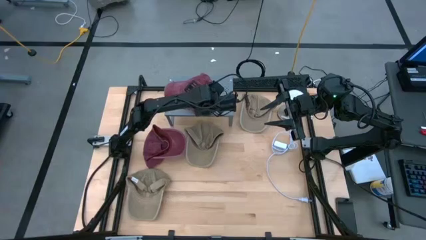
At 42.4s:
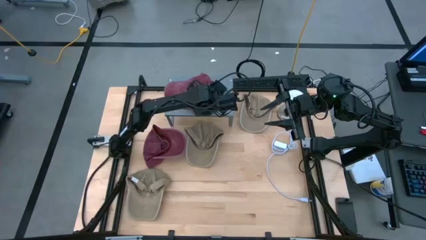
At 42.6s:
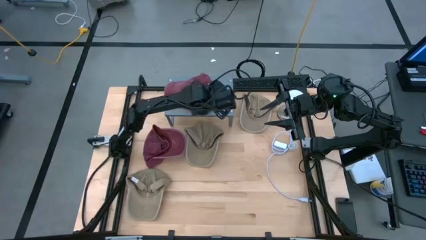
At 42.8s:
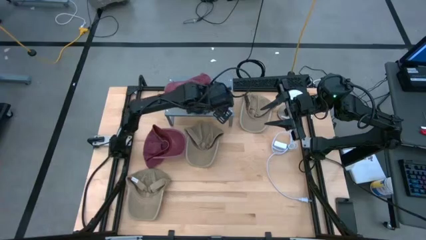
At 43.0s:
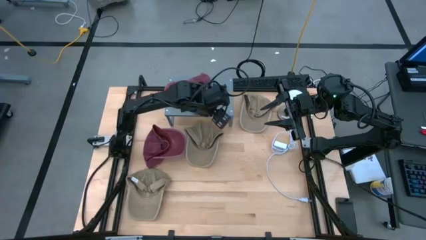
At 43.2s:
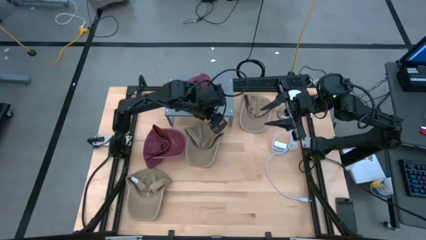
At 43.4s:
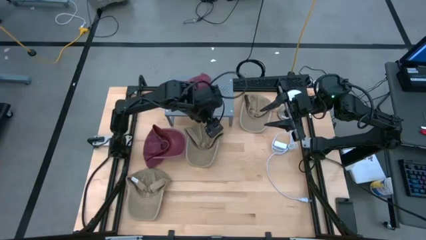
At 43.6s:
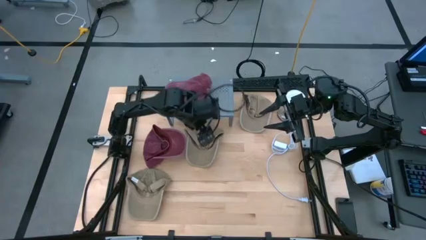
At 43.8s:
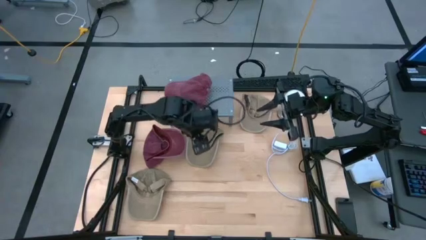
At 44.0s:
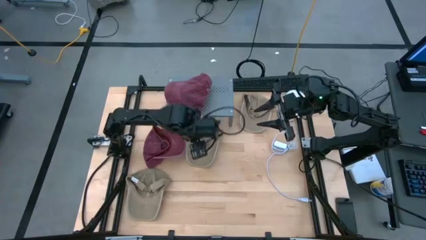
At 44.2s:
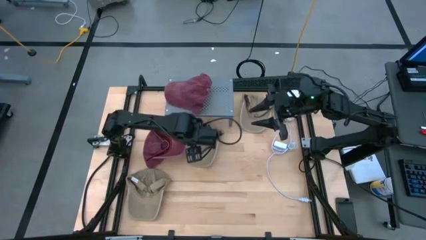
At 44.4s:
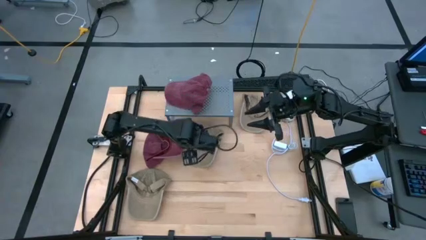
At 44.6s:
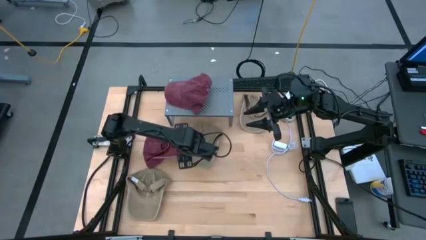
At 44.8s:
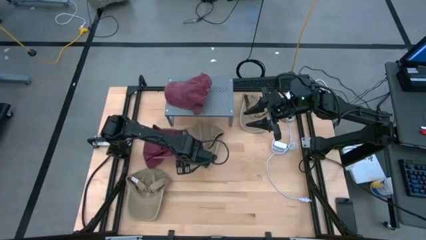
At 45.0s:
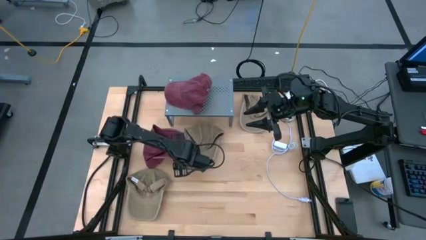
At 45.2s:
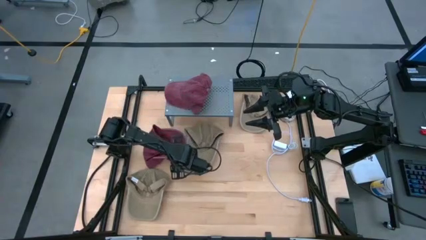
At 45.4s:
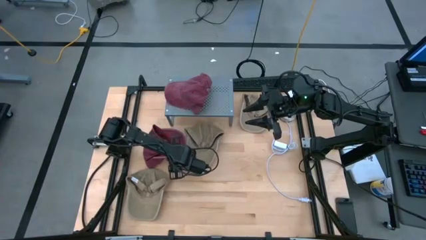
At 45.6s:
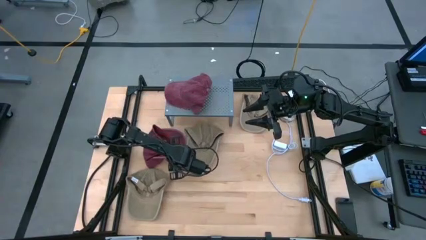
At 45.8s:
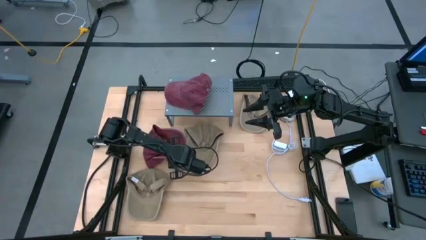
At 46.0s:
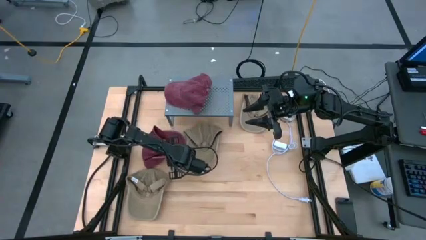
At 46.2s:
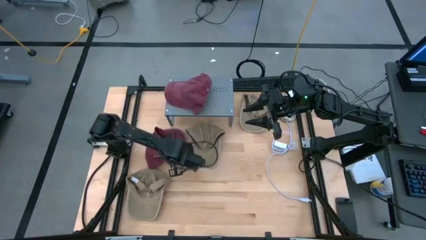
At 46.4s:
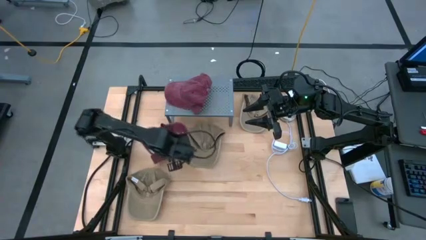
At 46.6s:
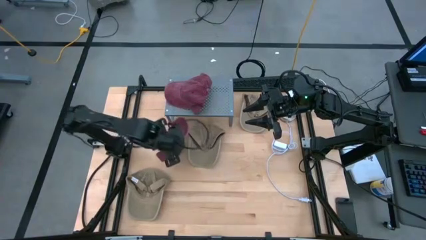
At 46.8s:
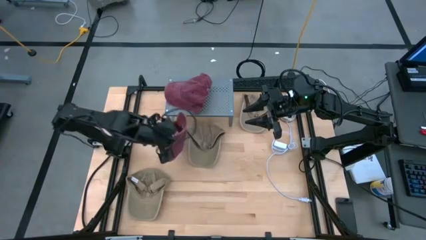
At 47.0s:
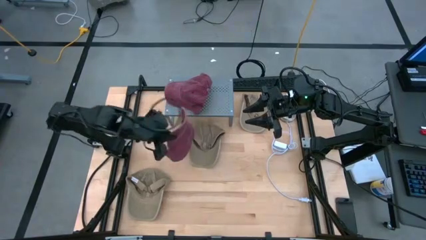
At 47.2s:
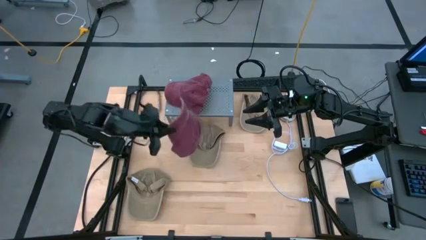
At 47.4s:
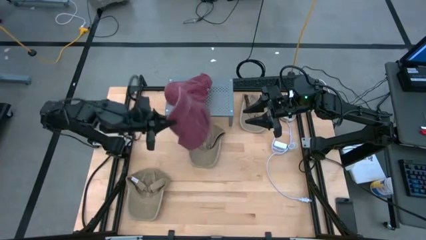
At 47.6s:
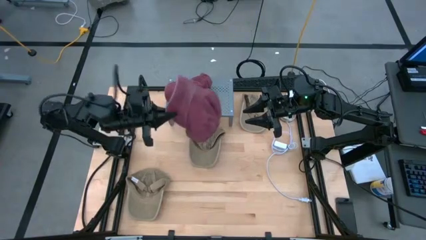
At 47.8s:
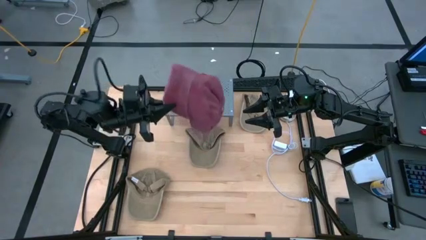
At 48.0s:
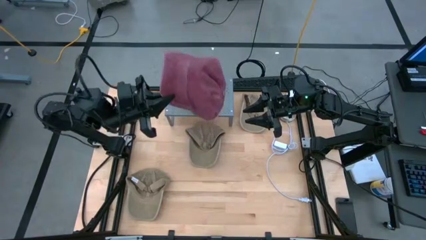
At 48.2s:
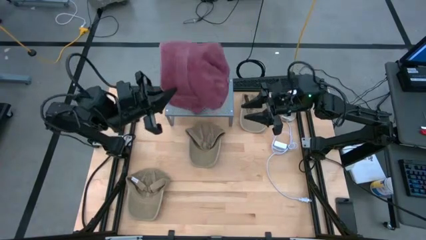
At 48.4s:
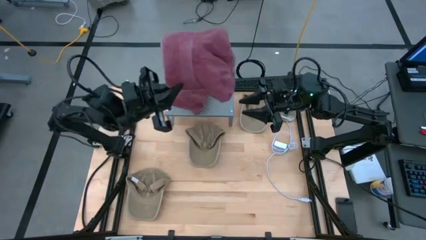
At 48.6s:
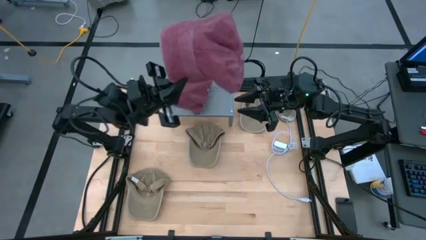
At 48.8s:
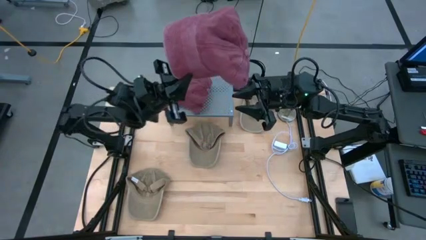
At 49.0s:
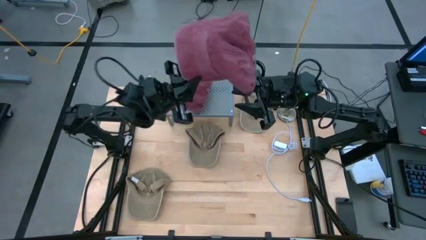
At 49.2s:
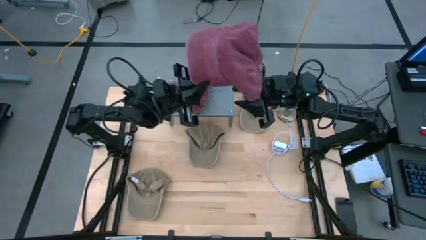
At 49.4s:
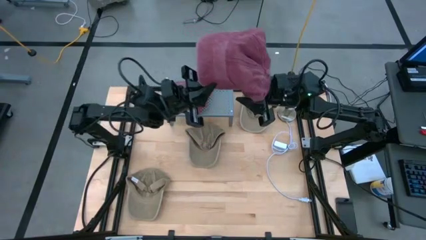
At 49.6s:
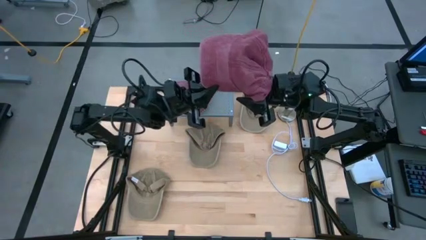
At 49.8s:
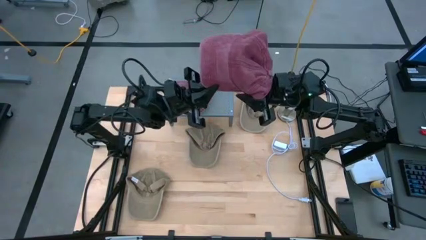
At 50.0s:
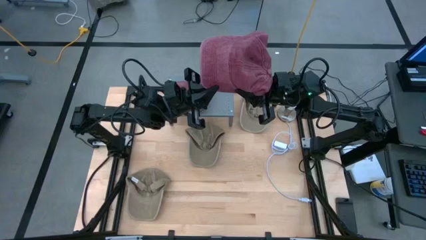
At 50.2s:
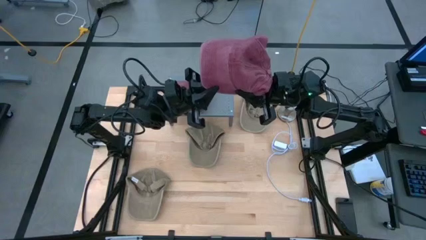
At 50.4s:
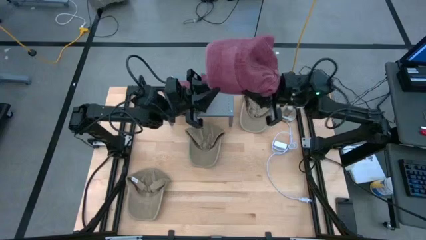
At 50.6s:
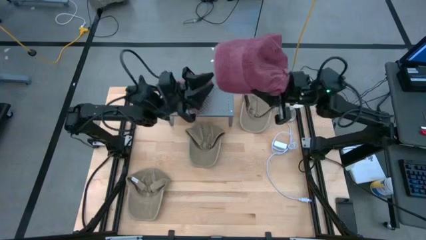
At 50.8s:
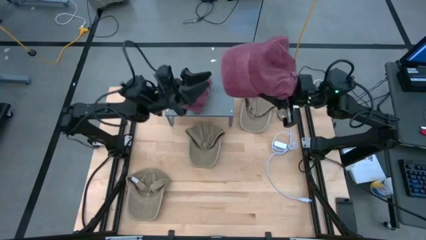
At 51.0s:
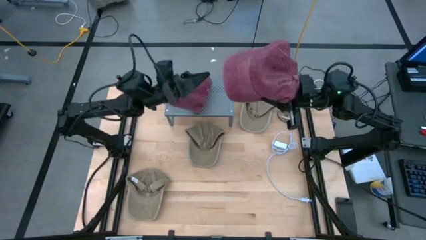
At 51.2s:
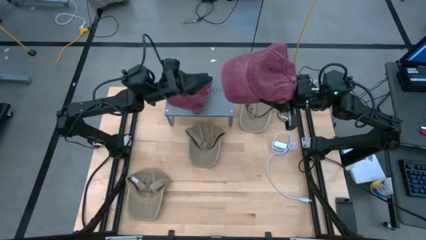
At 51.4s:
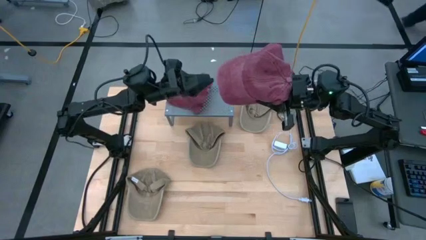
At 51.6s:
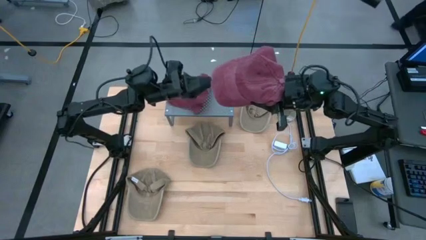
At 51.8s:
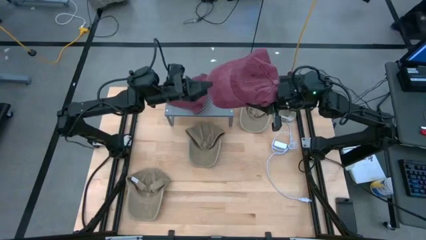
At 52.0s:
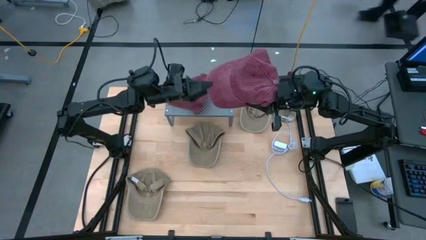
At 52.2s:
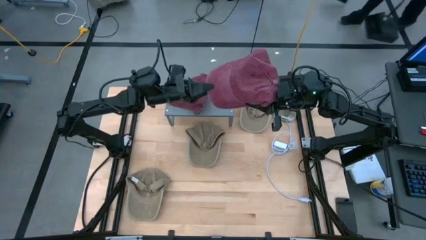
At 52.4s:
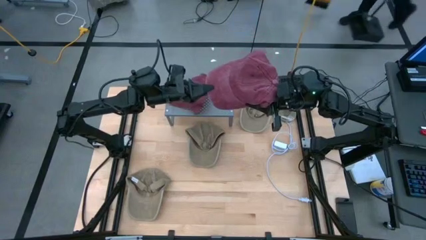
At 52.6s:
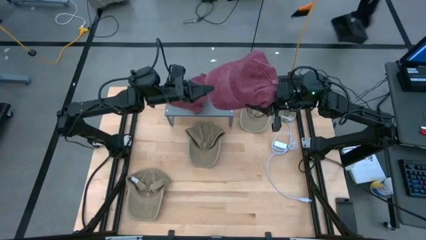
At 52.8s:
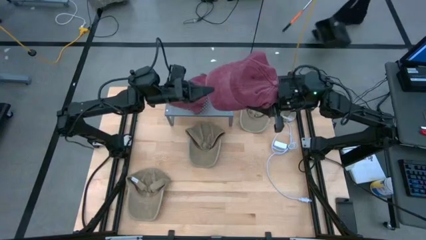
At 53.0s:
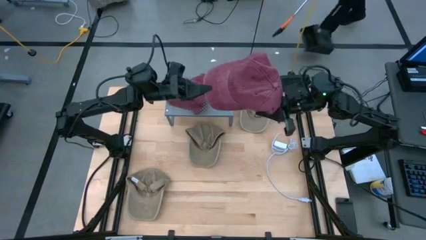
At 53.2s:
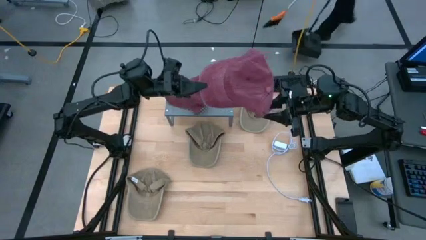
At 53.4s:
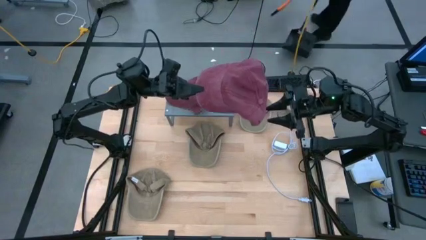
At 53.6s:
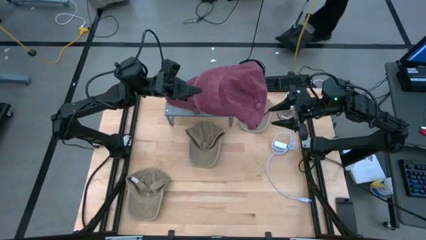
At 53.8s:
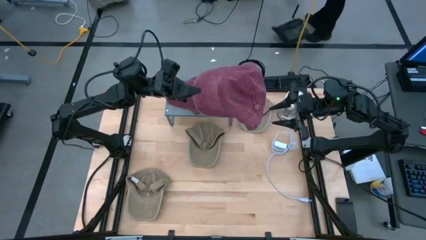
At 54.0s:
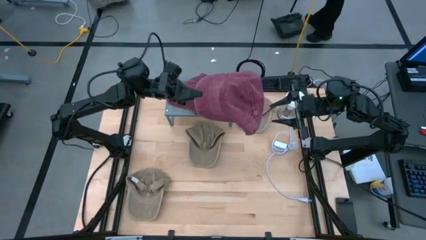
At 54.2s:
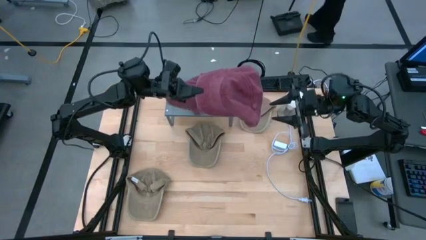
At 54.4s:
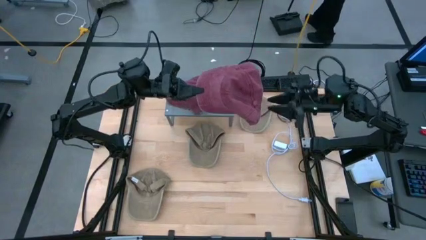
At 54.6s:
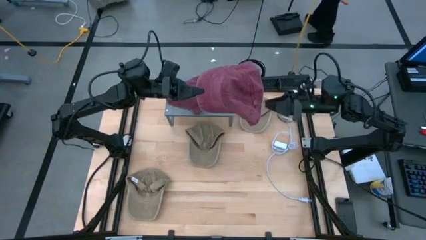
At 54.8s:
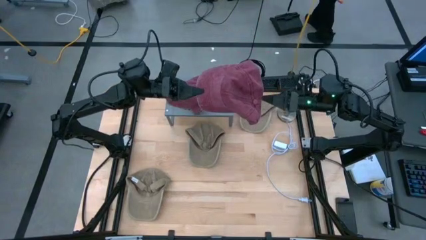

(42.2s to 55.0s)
Task: Pick & Place hat
Stack the dark red cap on the dark red cap on the shelf

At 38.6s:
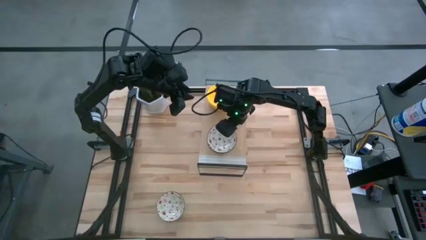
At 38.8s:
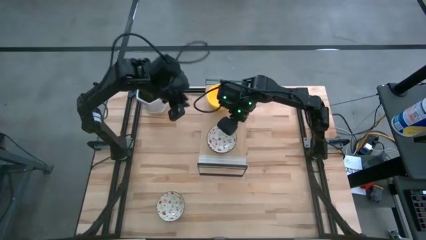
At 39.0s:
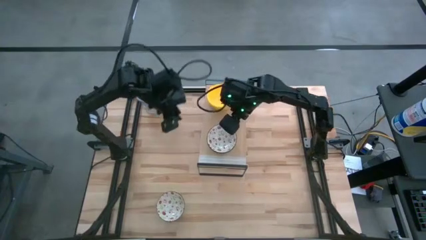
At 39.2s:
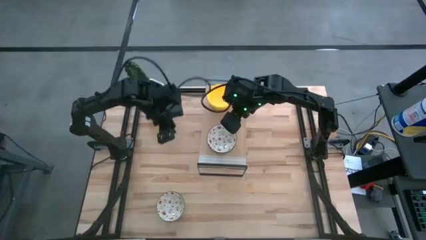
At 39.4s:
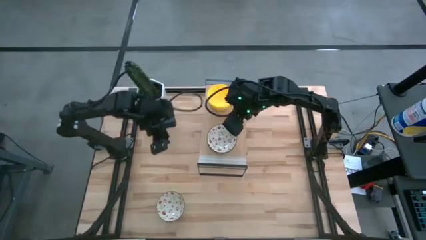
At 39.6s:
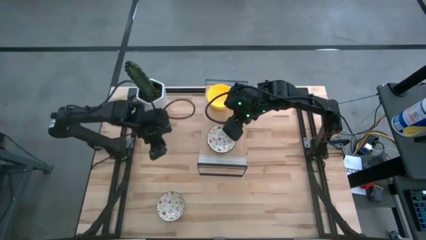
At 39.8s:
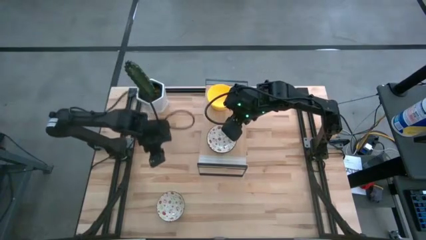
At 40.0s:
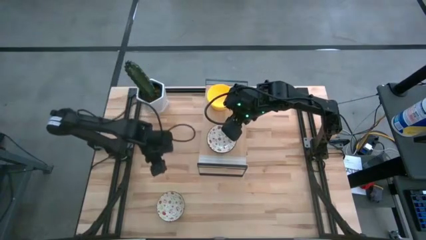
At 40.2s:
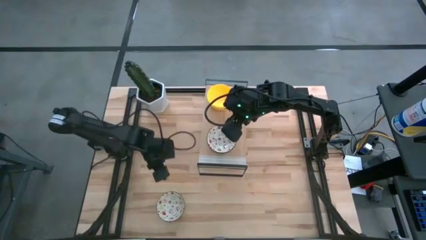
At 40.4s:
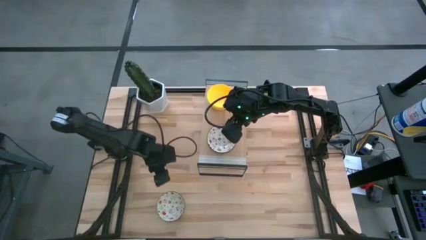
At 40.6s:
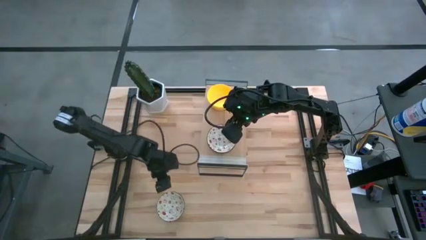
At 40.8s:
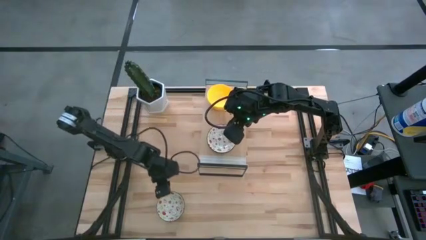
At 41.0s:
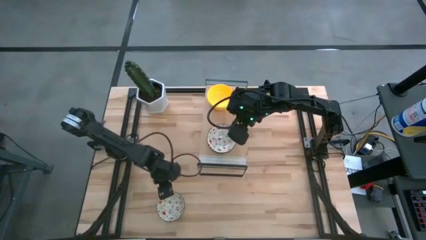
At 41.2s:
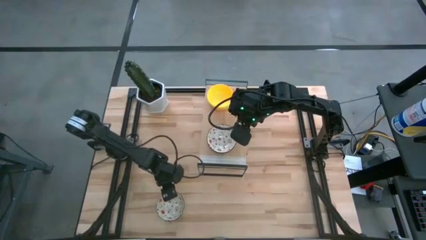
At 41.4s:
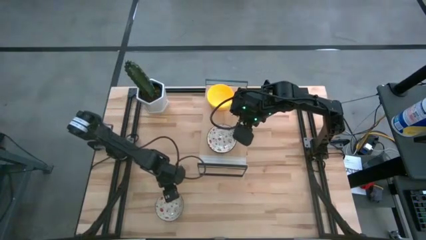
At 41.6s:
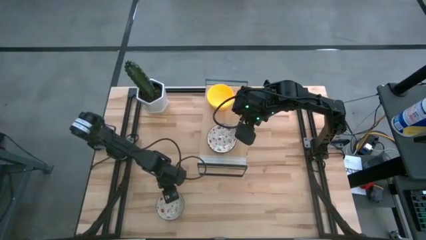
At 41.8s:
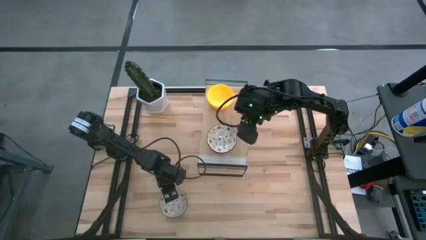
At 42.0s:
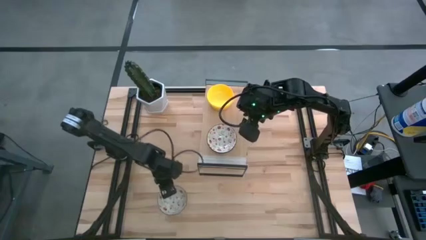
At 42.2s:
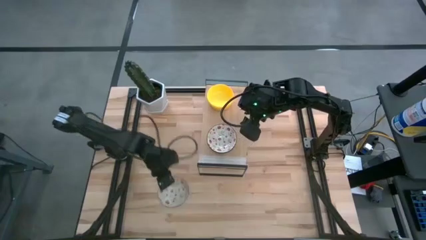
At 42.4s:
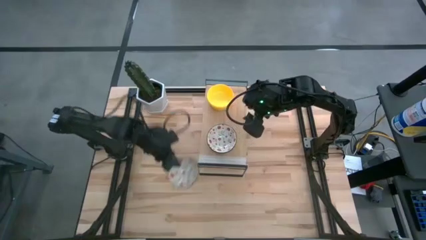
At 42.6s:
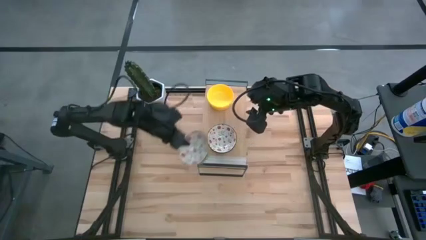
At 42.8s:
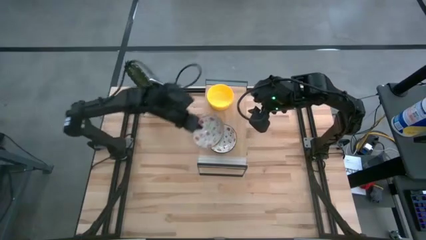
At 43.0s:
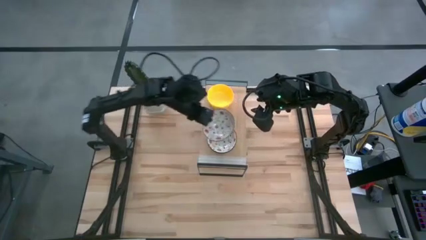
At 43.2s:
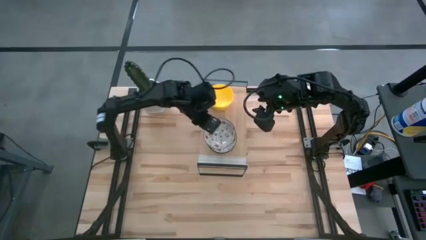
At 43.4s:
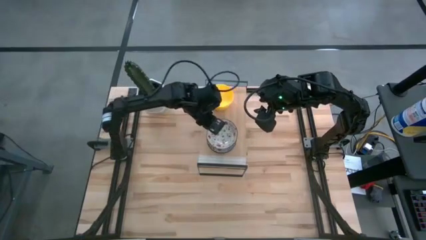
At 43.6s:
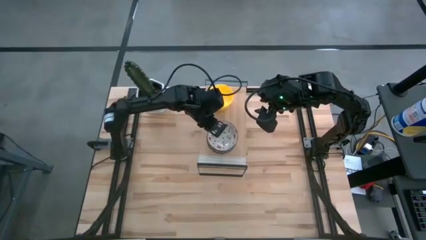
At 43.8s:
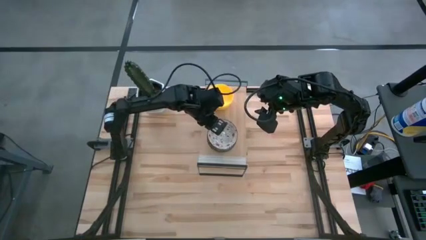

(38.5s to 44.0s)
Task: Pick & Place Mini bowls
Stack the white bowl on the white bowls on the shelf
